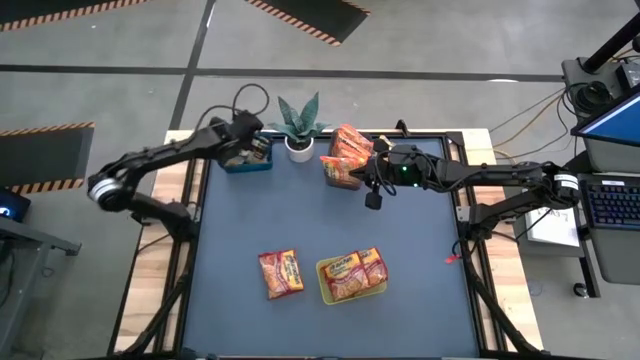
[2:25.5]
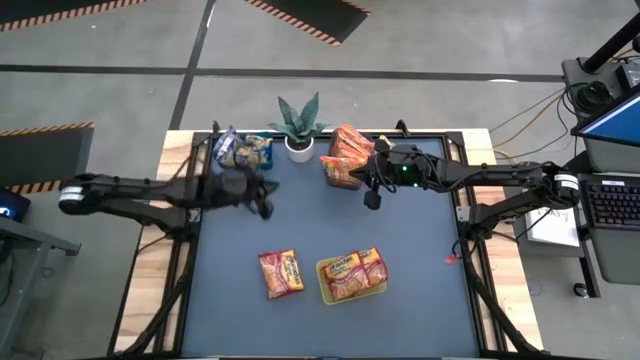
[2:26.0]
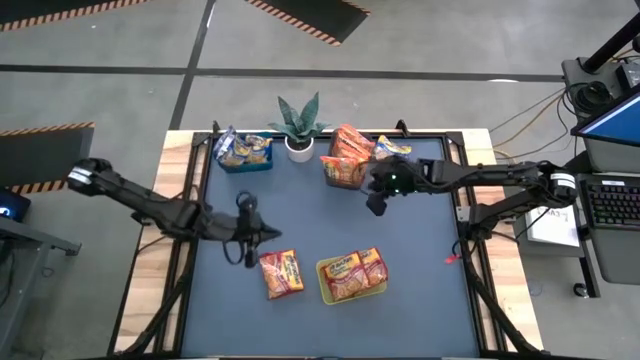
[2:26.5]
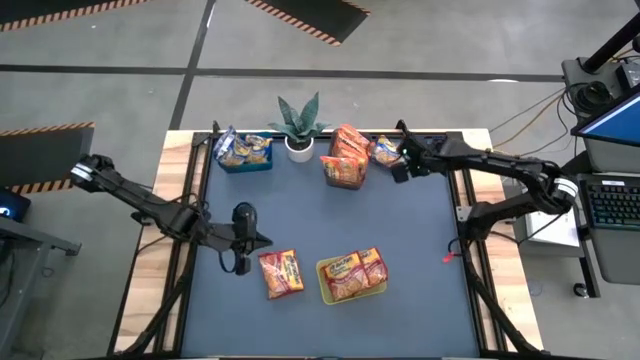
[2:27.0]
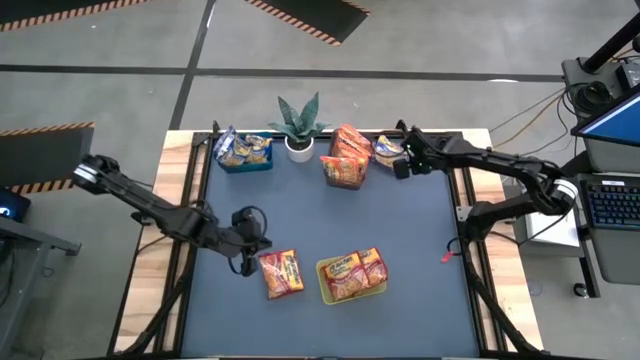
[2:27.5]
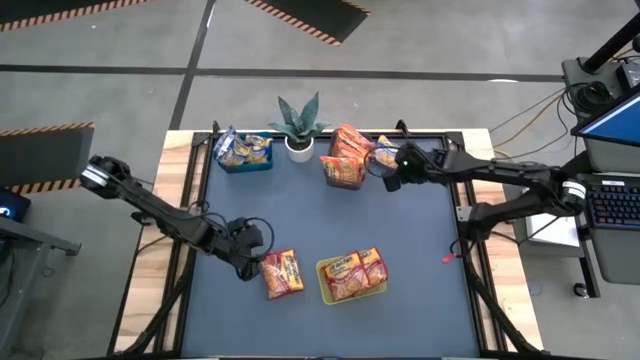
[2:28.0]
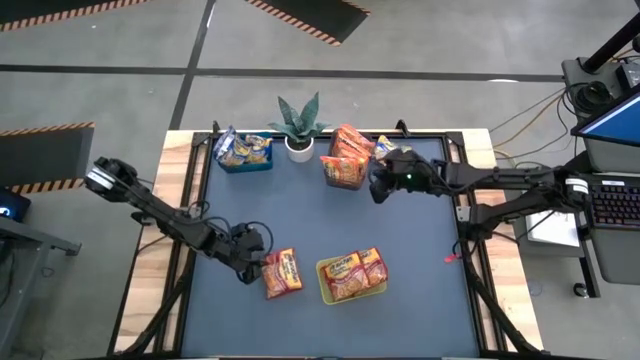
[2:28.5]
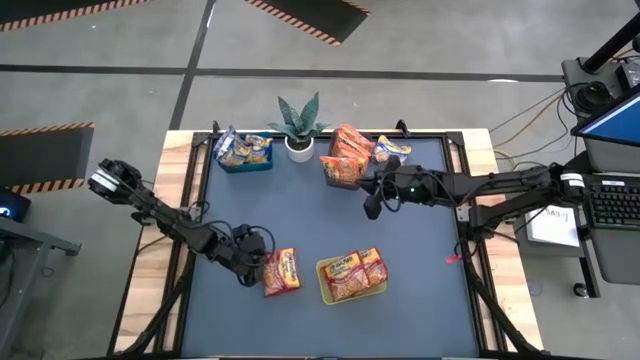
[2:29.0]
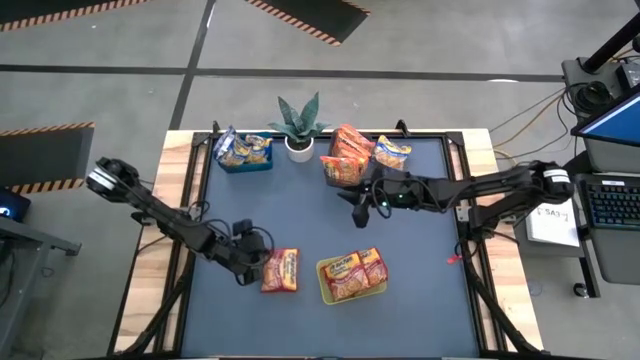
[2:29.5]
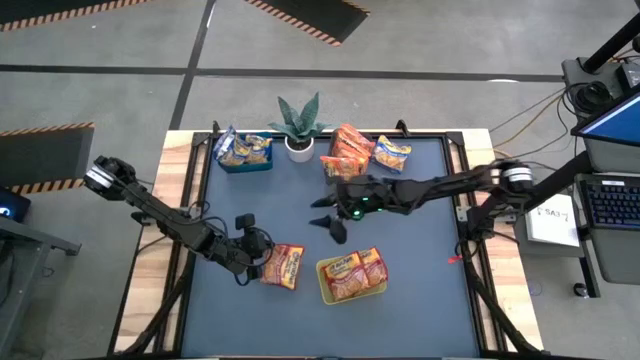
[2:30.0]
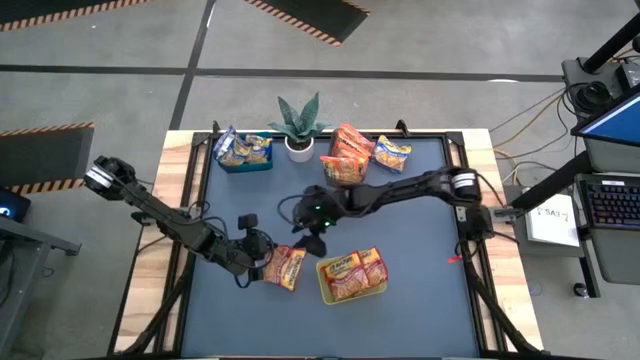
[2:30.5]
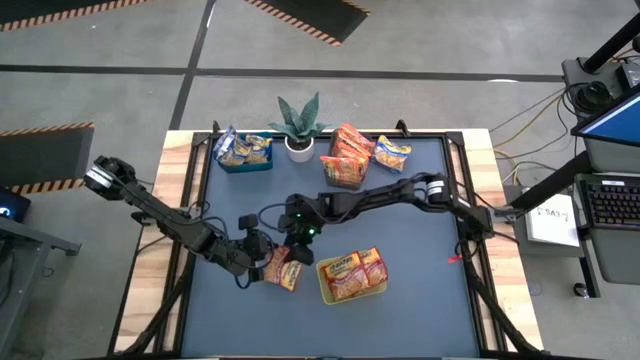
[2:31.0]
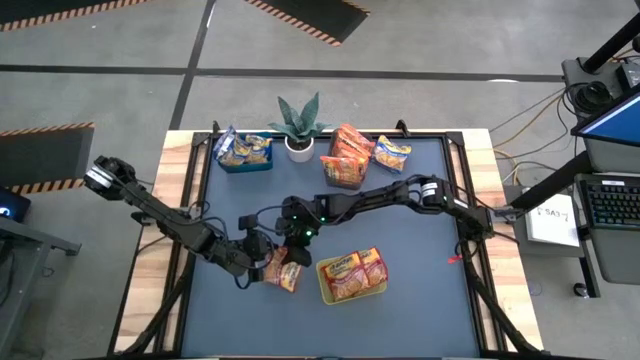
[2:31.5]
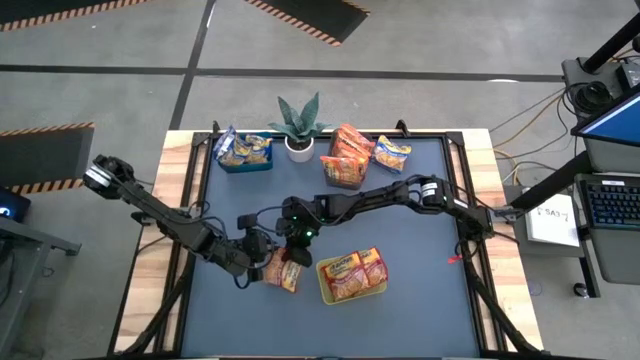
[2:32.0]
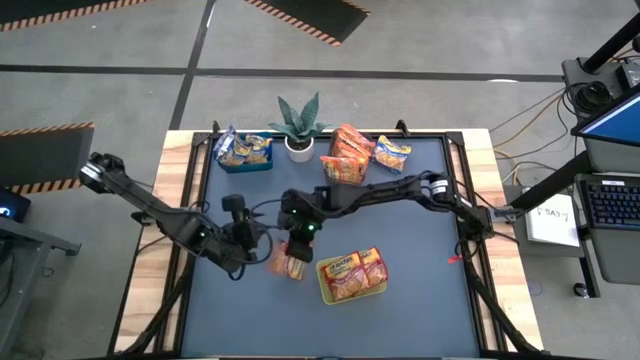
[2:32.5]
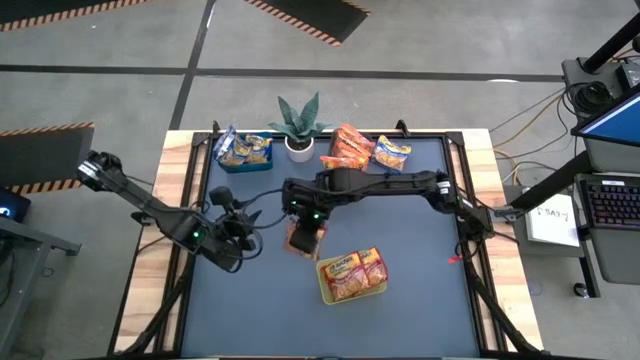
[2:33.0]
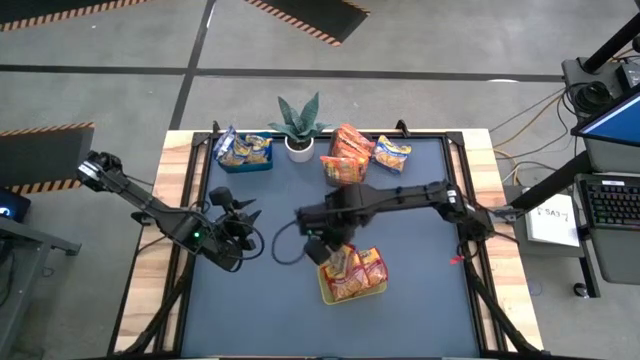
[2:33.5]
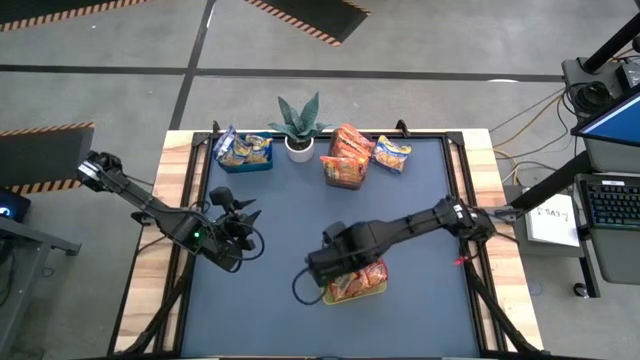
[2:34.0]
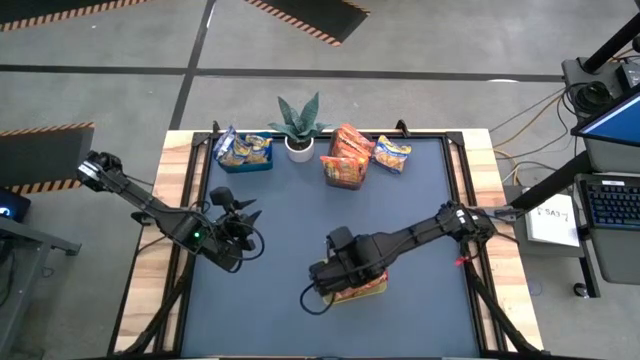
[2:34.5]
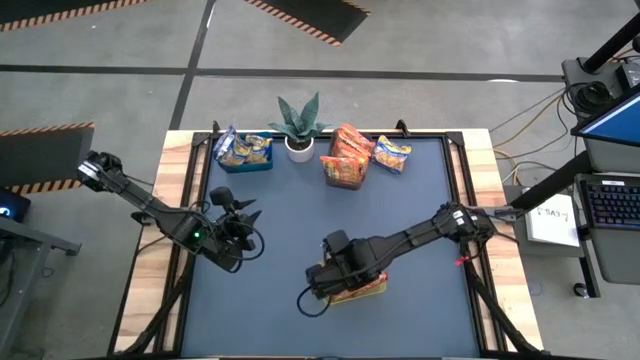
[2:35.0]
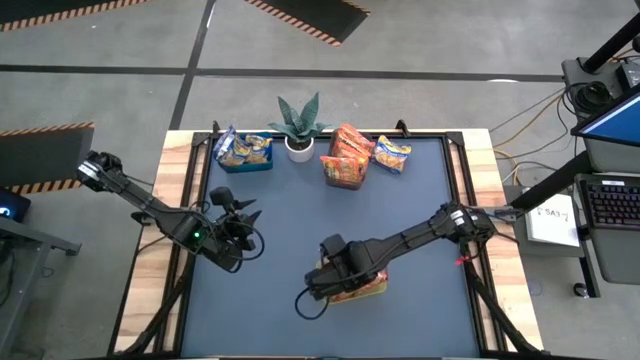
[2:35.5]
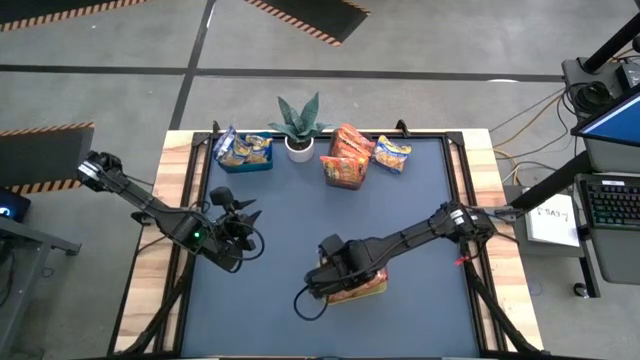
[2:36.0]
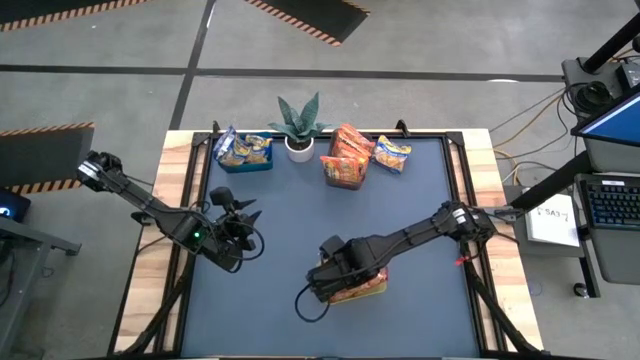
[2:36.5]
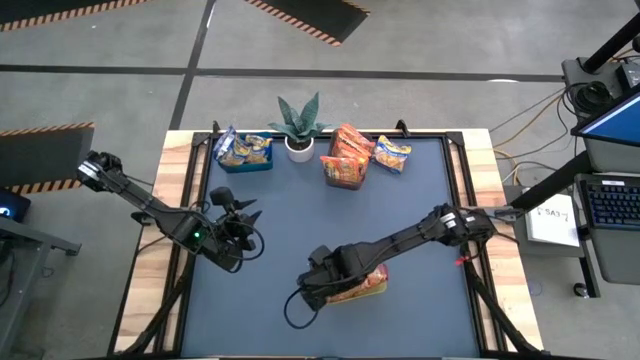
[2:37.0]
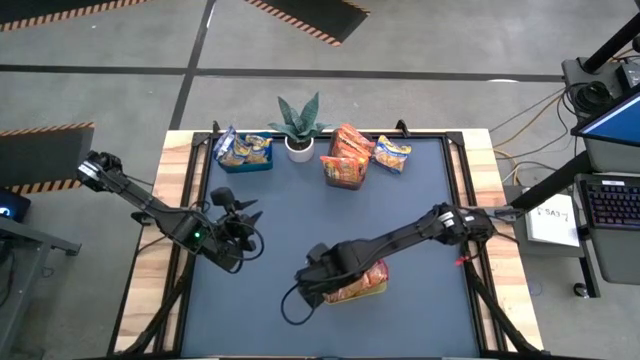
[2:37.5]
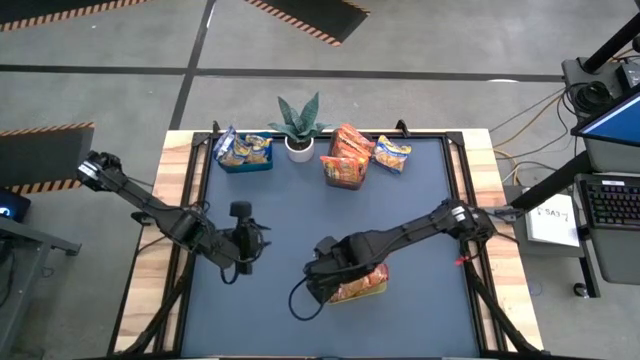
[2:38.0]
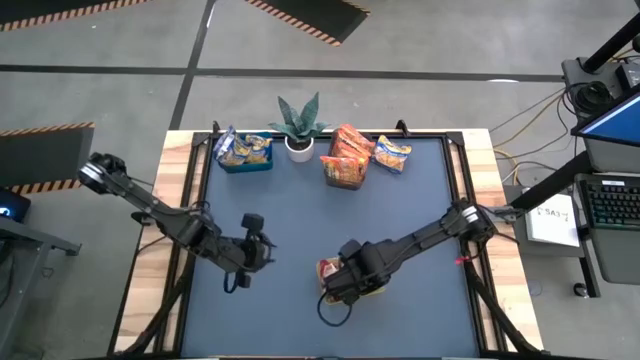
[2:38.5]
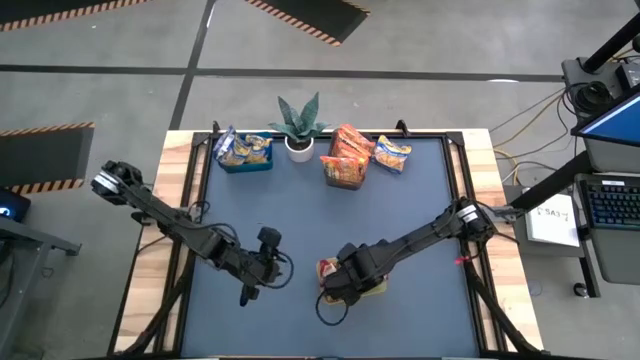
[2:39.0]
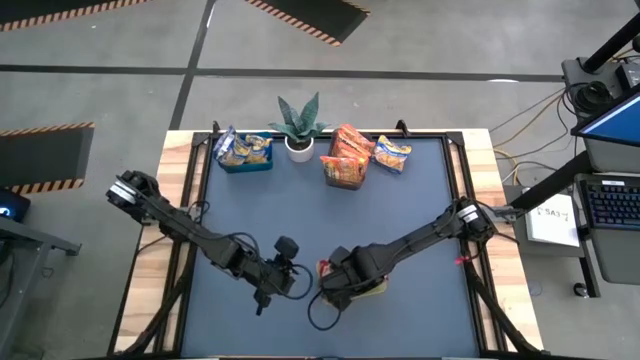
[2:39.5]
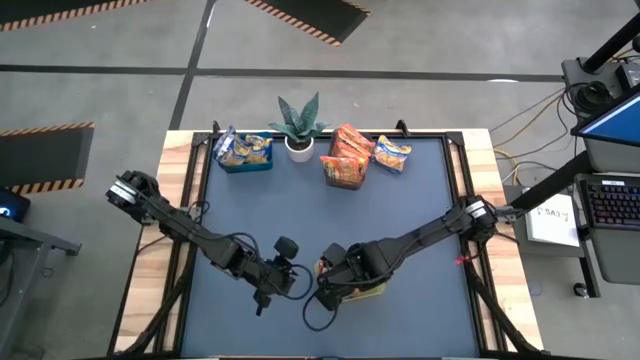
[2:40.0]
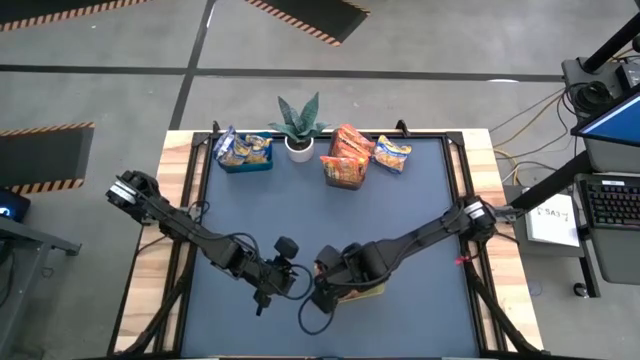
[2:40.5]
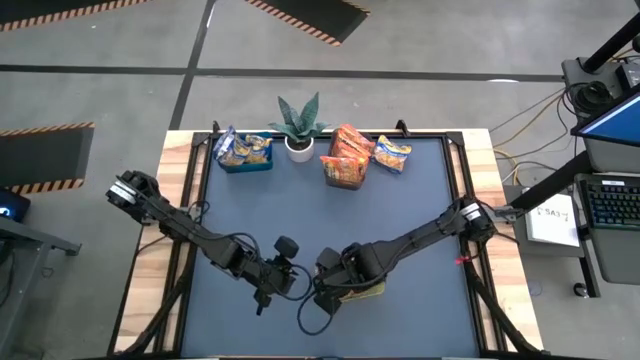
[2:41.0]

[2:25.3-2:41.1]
Task: Sort Maruchan noodles
Put the red bag into the yellow bin

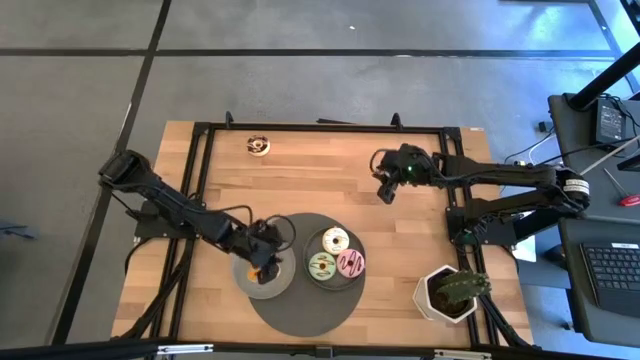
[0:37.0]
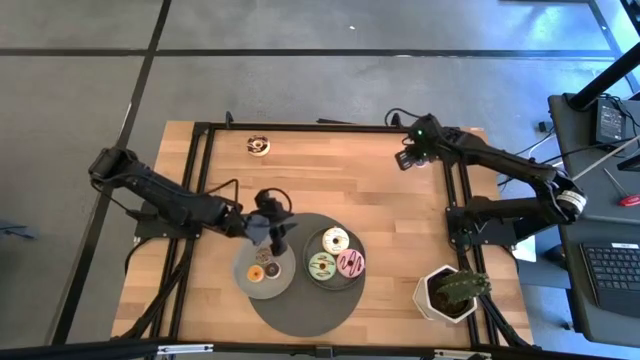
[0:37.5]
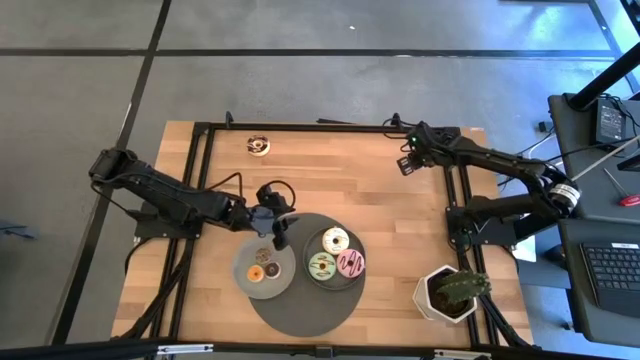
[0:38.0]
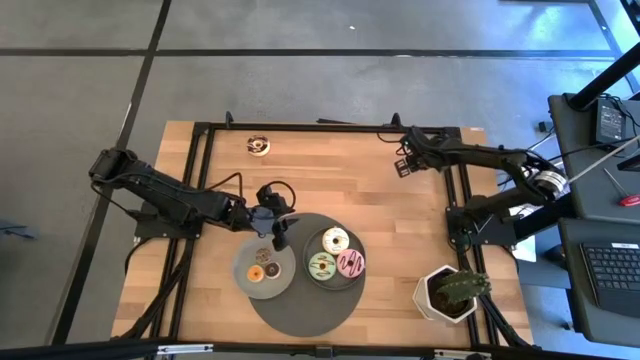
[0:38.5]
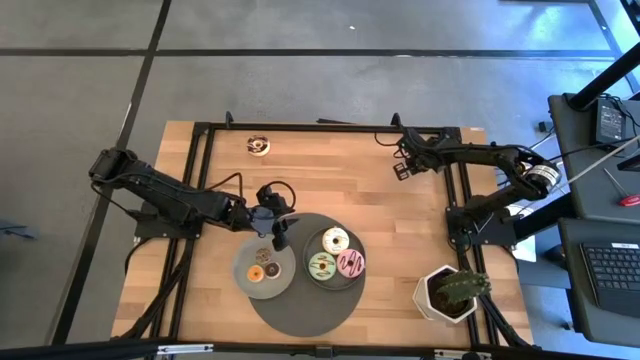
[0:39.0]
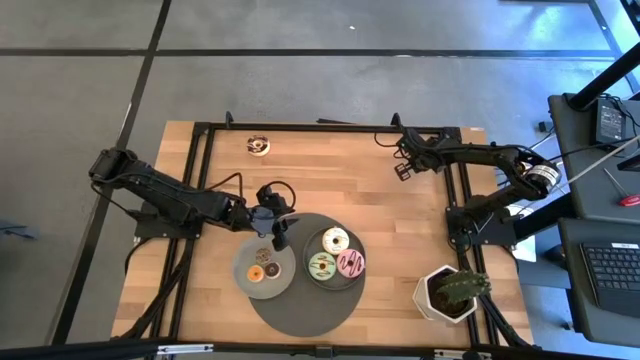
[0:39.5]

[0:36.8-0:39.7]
Task: Pick & Place donuts
Put the small blue donut on the gray plate
